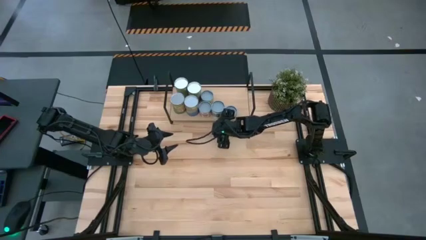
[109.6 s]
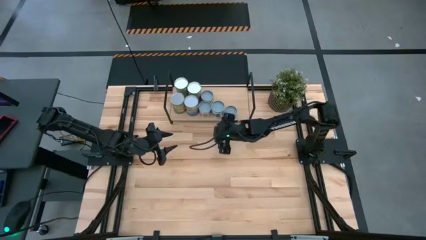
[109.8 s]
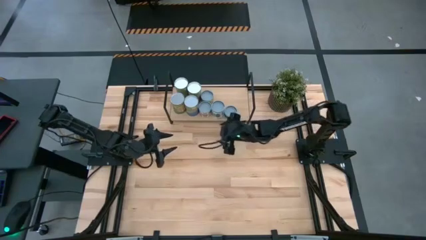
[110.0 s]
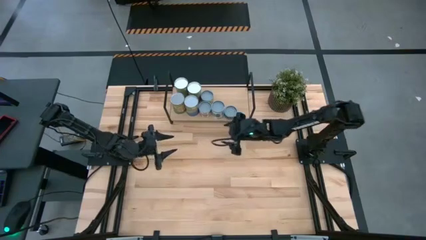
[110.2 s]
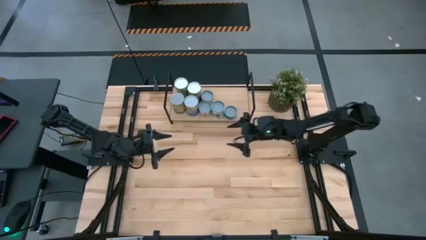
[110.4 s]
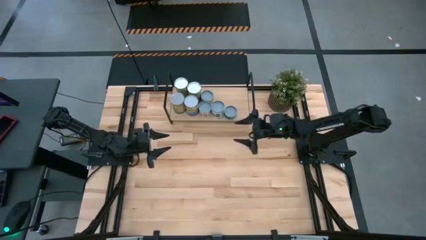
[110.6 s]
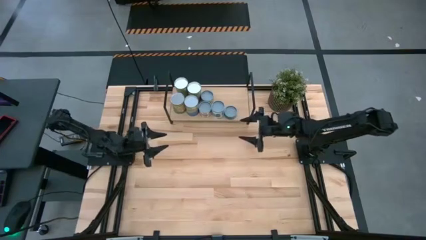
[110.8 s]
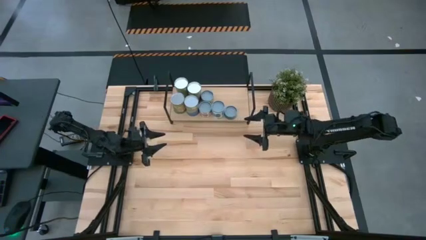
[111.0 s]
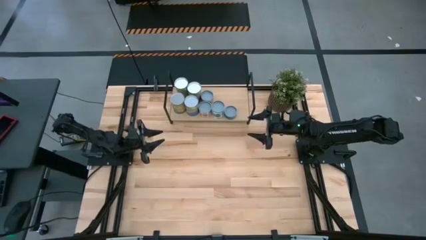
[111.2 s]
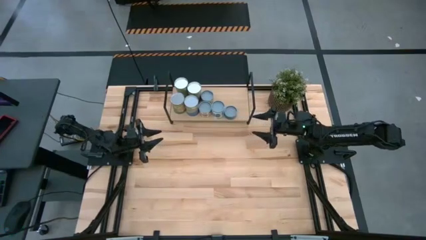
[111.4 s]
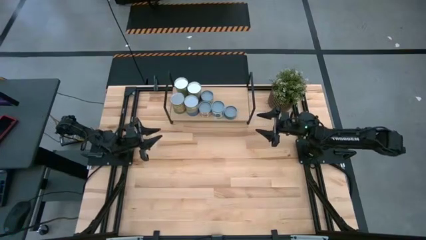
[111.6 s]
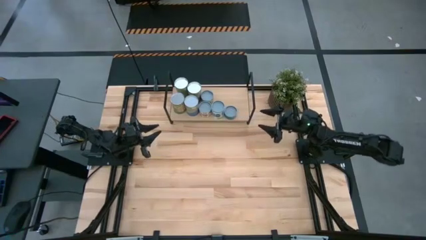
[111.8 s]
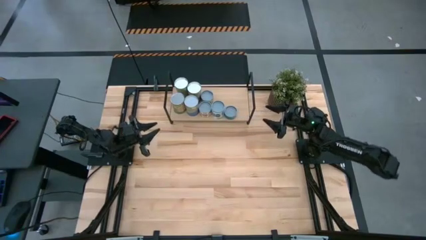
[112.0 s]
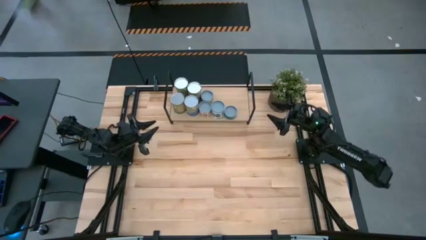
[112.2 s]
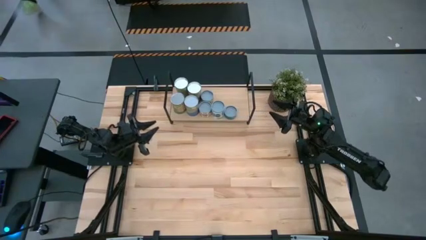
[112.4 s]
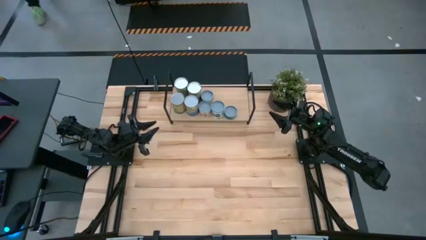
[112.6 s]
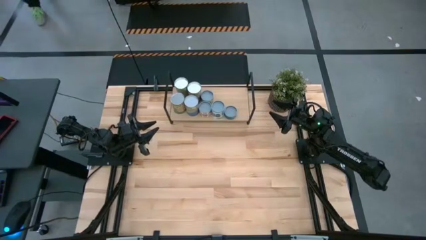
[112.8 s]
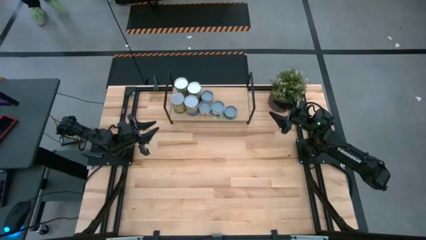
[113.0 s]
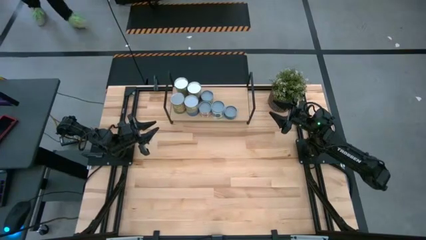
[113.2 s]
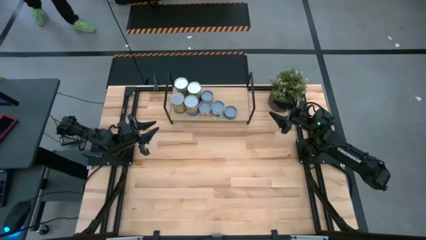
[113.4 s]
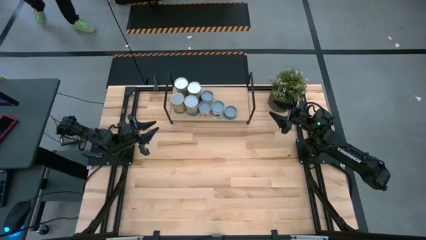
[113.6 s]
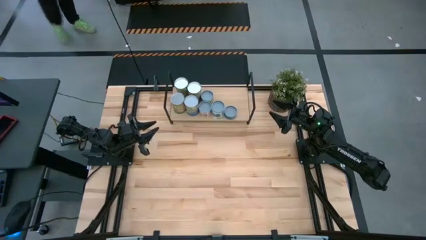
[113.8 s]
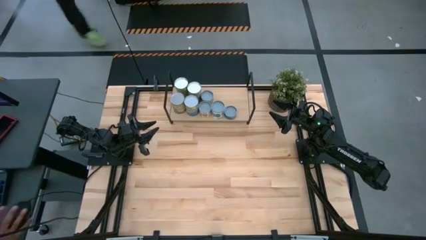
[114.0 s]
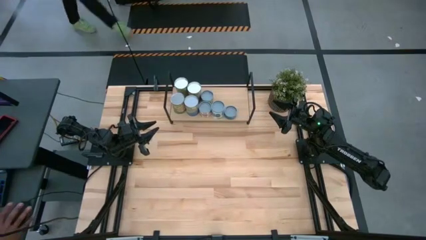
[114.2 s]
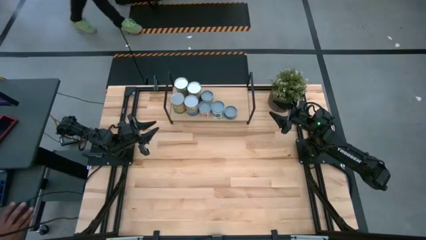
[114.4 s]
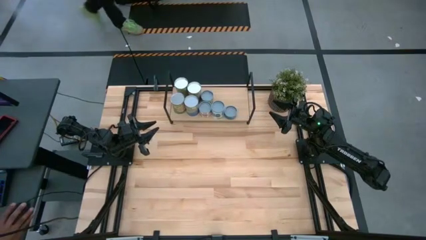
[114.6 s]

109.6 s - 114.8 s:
Task: Pick and place cans onto a shelf
Return to Home Position

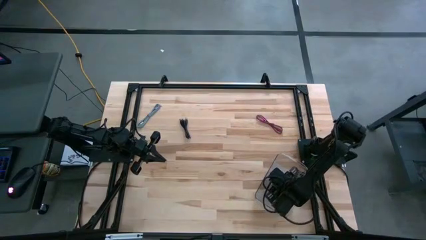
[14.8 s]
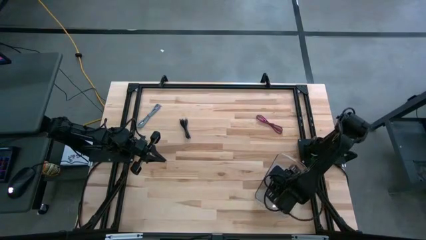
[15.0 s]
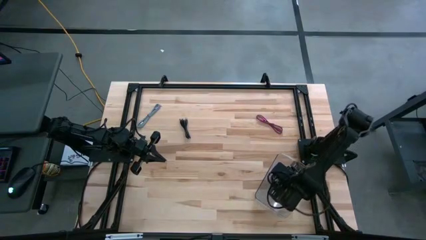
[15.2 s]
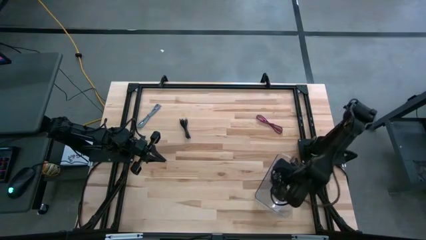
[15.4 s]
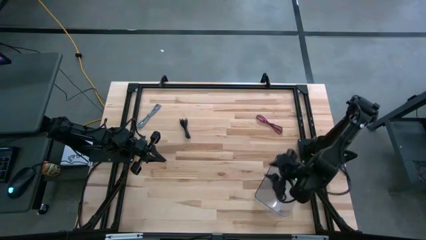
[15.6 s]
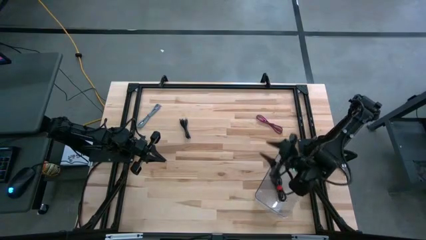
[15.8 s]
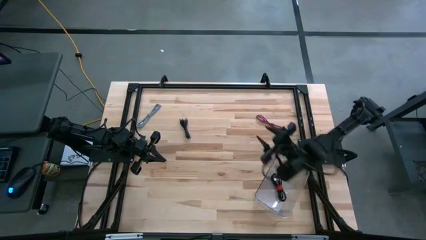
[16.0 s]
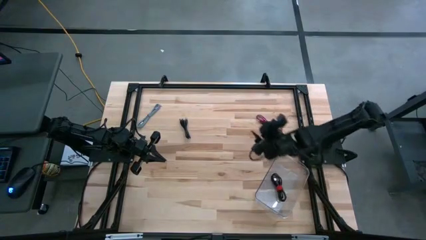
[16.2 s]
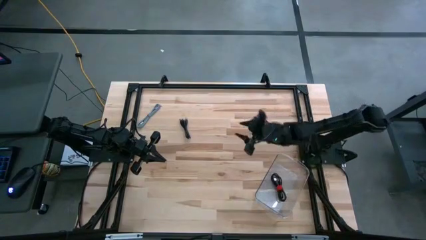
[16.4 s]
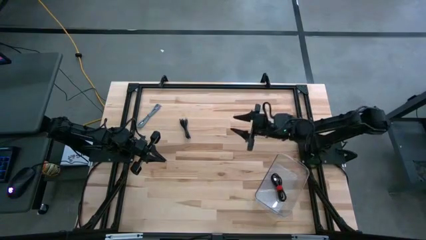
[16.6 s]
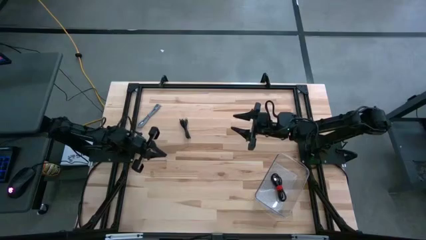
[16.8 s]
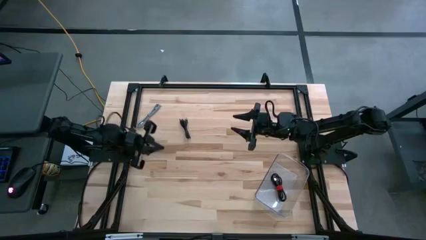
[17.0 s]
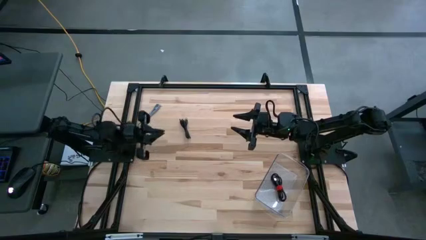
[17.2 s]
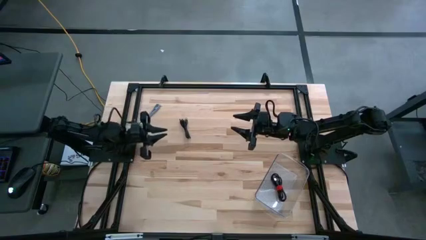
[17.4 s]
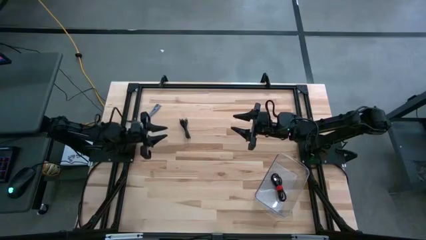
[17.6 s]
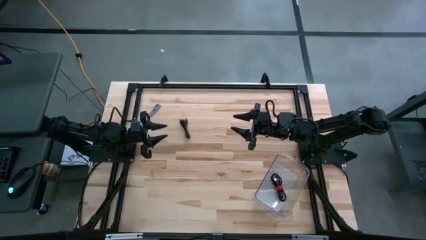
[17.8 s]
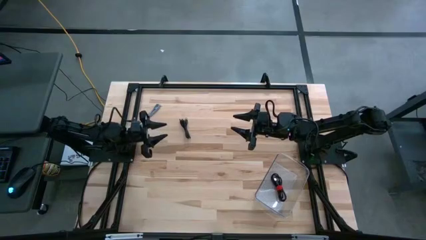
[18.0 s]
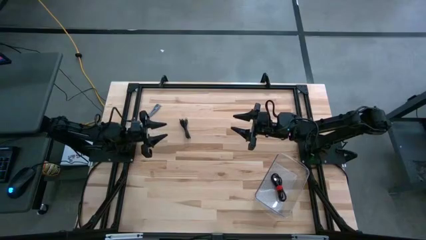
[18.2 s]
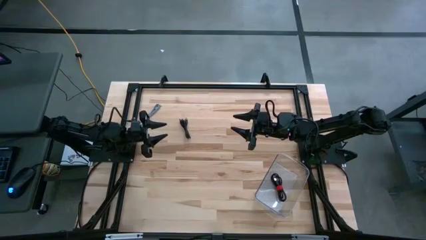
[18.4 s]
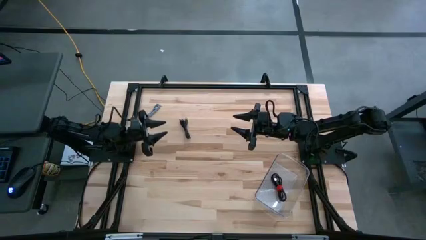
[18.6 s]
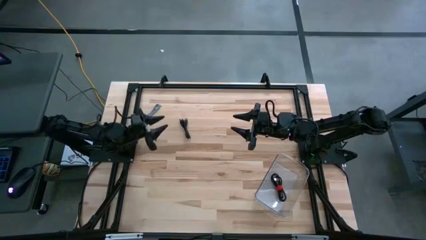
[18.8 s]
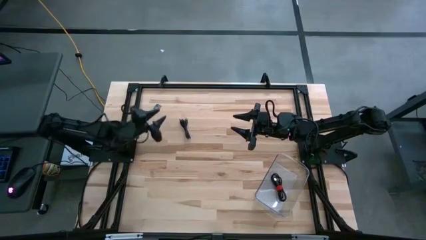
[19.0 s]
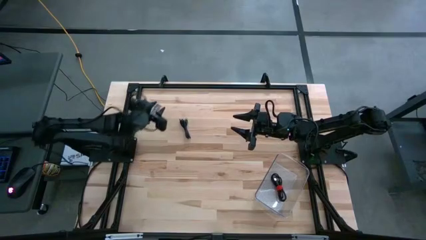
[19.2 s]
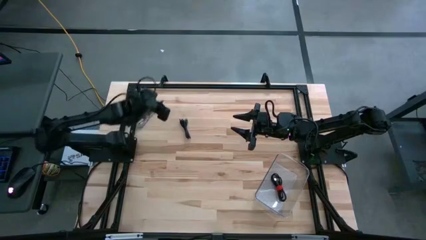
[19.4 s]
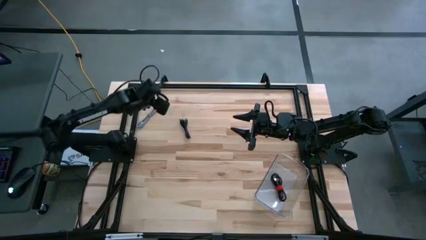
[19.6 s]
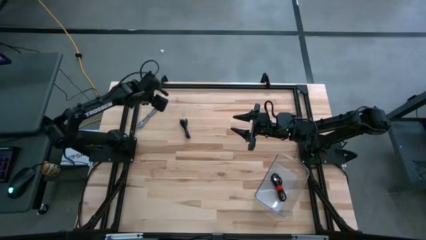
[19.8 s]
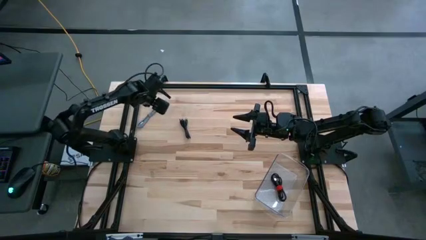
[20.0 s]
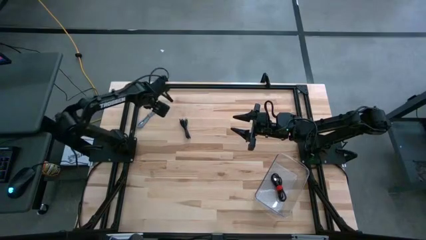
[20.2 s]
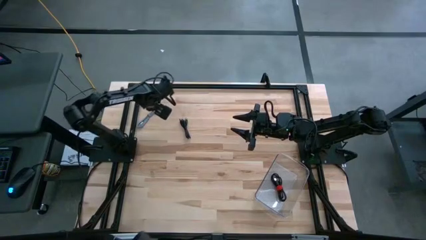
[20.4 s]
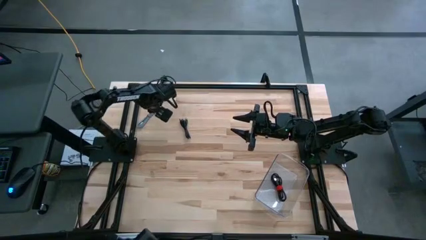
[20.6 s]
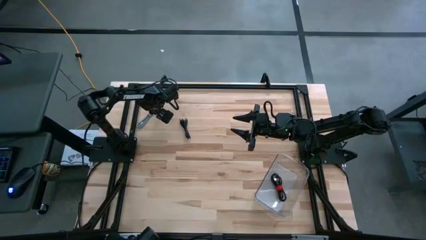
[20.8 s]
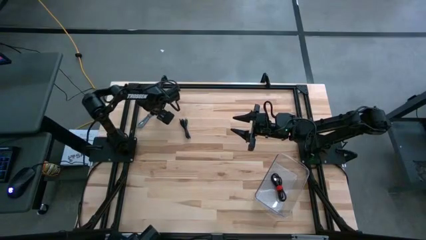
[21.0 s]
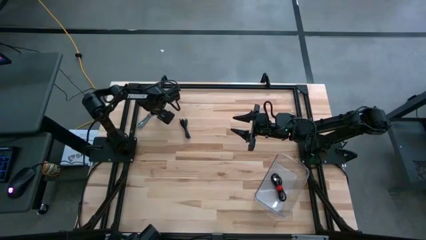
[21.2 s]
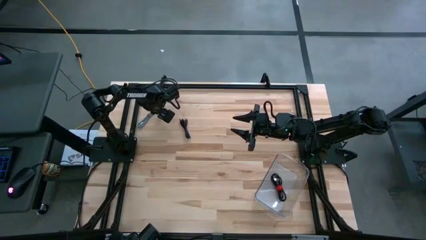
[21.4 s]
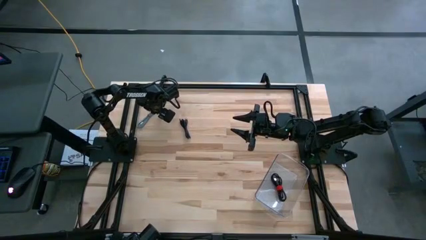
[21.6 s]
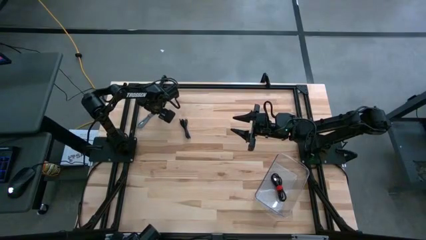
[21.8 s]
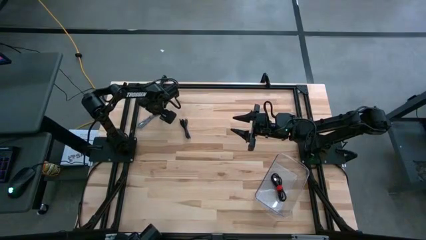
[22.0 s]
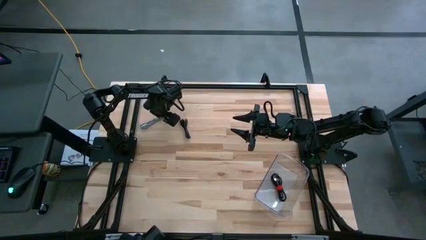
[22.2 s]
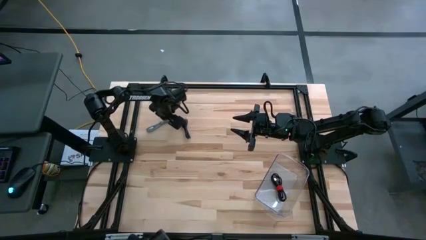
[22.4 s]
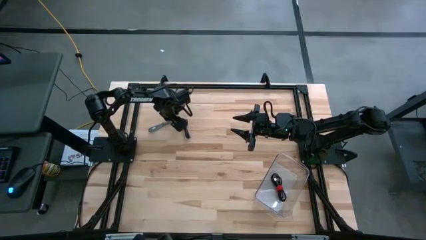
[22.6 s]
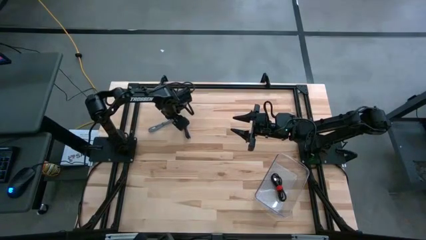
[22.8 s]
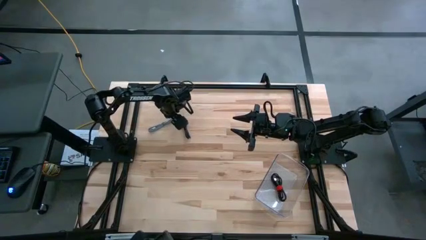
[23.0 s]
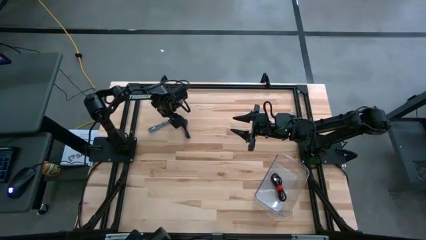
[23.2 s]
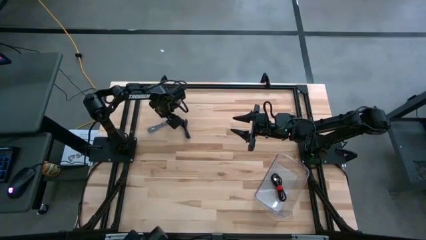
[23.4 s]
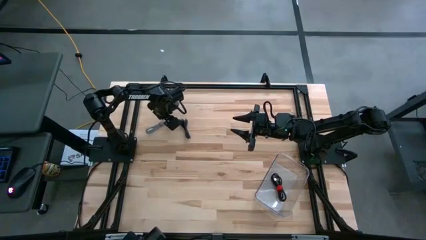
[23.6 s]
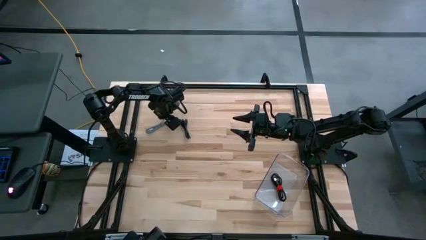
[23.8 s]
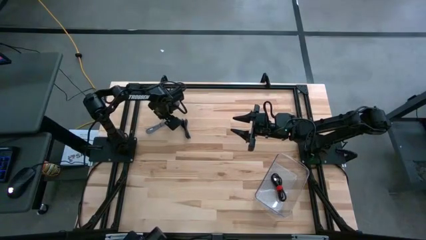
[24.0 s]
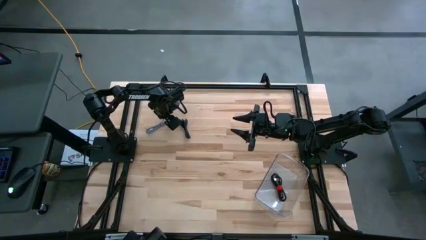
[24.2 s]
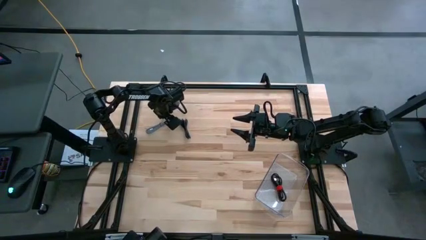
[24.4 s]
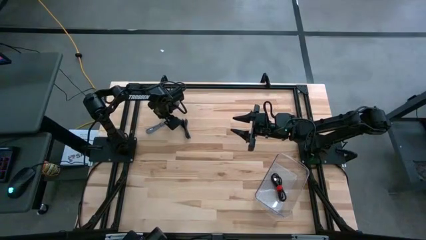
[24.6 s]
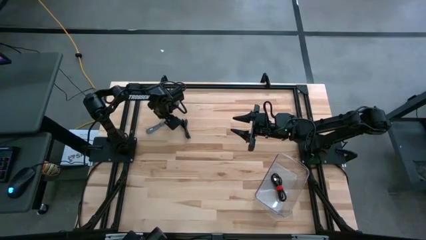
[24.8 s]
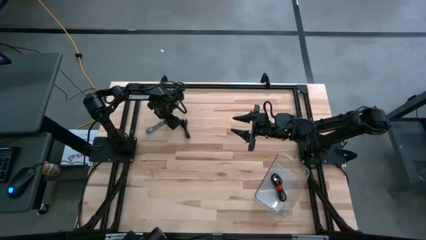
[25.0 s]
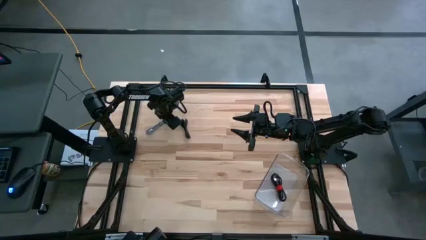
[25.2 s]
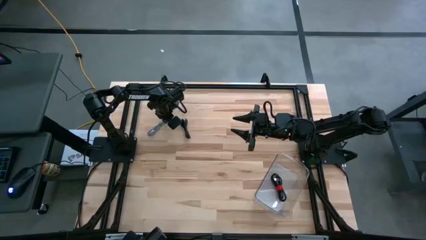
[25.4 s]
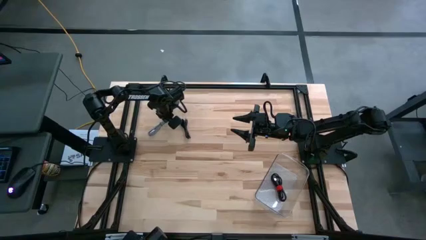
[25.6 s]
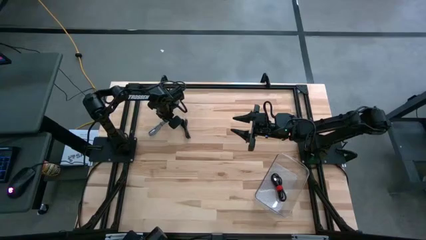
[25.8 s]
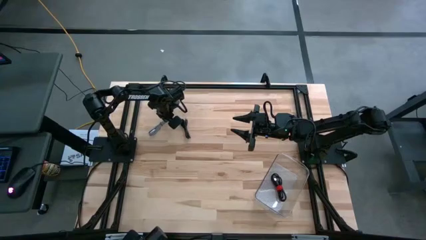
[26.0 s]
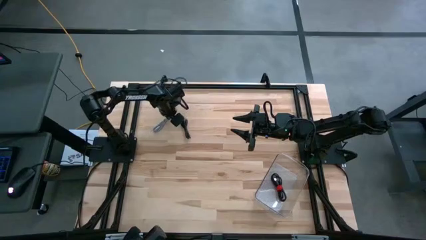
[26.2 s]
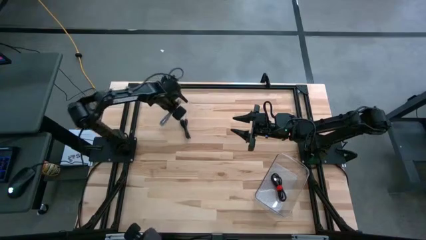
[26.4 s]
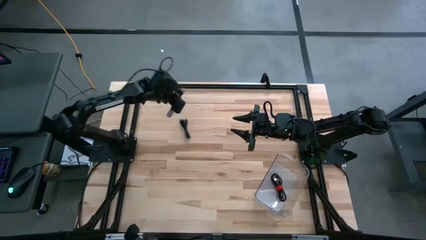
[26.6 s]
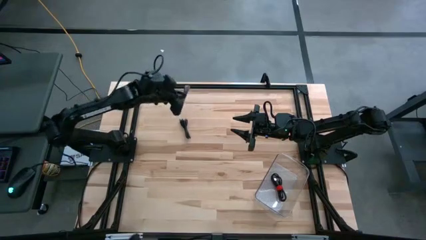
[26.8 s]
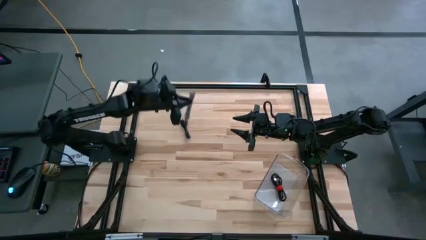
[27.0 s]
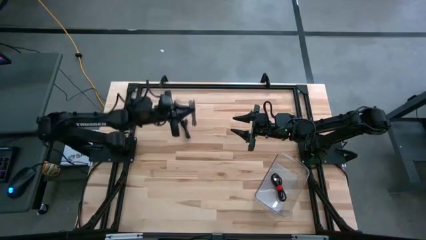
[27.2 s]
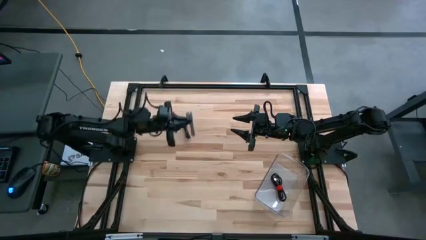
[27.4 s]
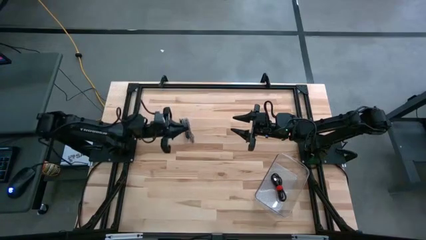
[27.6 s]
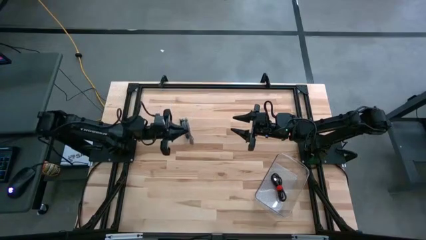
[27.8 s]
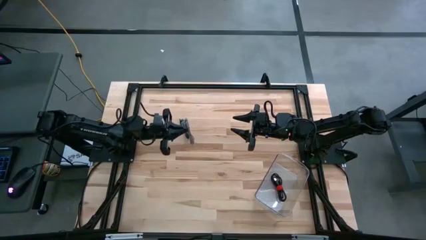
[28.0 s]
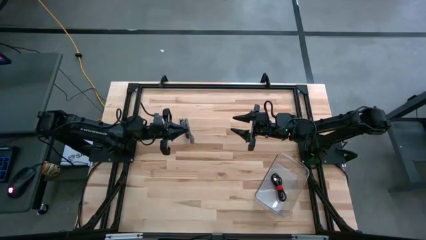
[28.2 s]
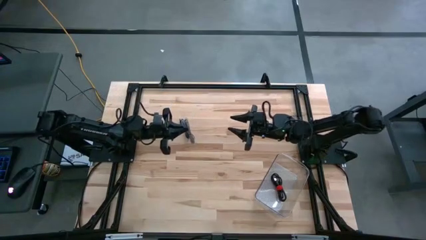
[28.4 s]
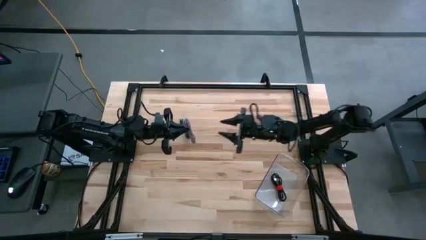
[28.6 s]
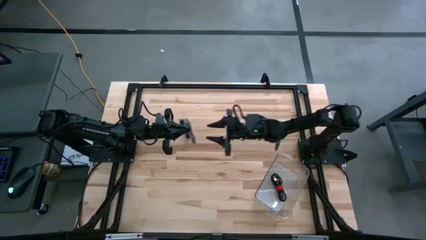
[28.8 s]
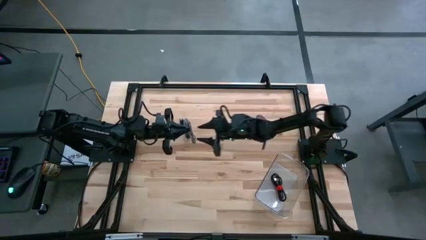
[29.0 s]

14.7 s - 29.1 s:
Task: Pick and place USB-C Cables
Put the gray charger cable into the transparent bin
